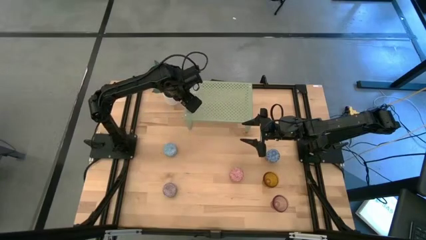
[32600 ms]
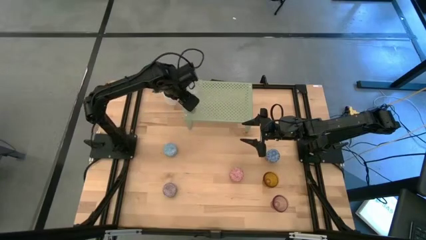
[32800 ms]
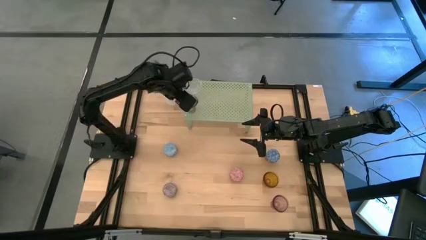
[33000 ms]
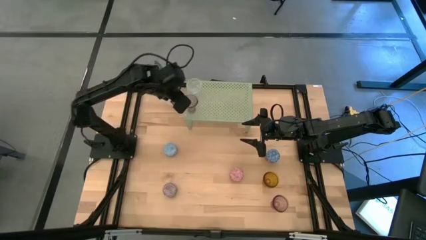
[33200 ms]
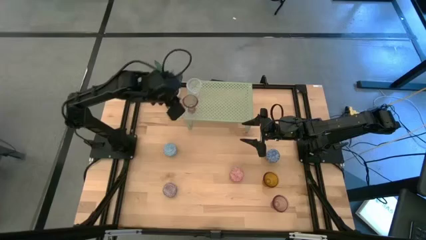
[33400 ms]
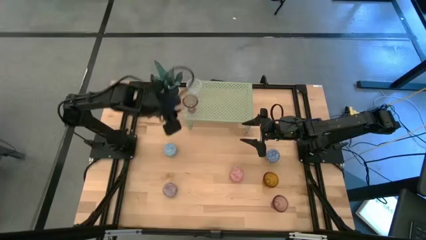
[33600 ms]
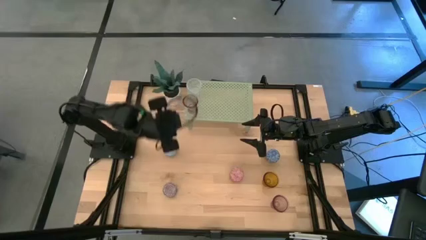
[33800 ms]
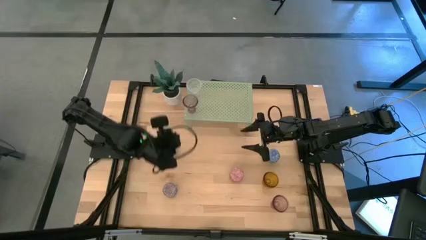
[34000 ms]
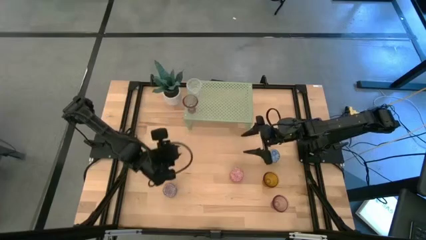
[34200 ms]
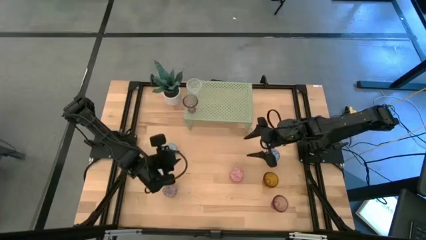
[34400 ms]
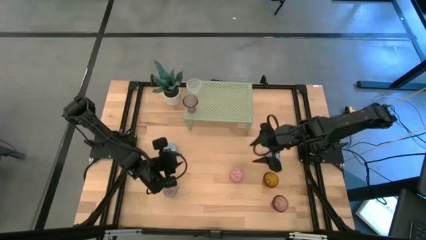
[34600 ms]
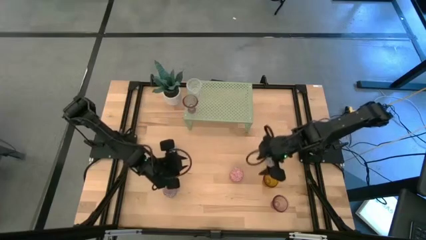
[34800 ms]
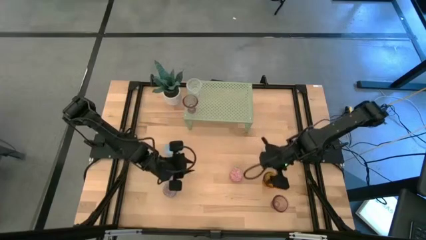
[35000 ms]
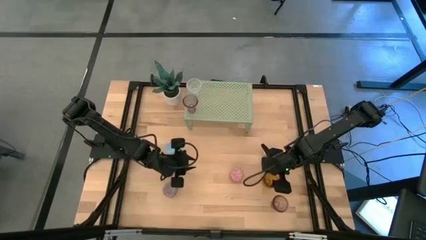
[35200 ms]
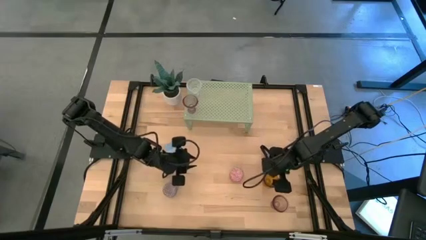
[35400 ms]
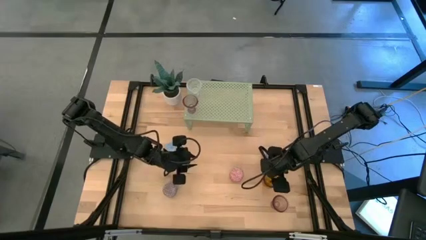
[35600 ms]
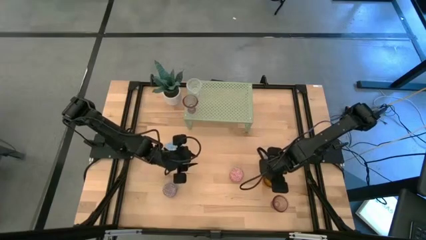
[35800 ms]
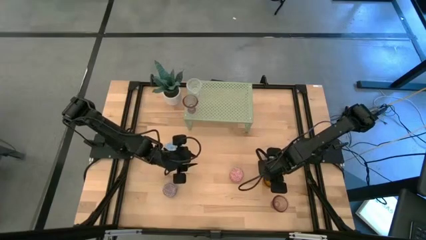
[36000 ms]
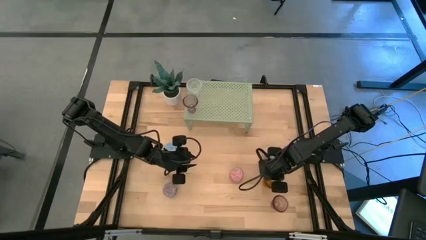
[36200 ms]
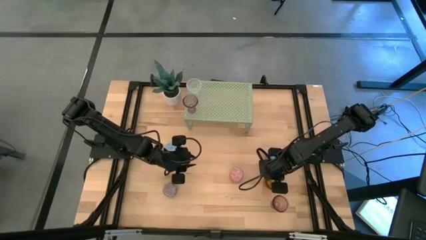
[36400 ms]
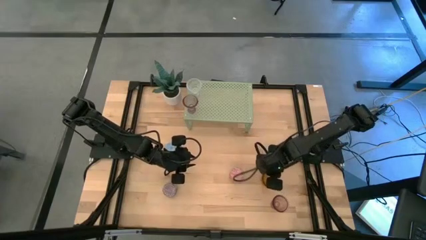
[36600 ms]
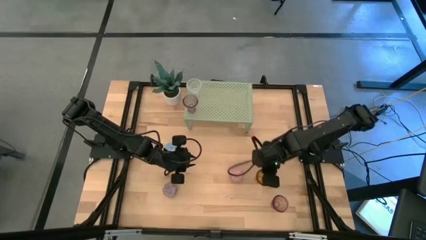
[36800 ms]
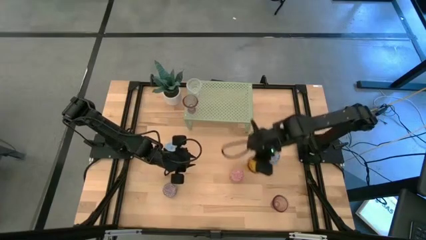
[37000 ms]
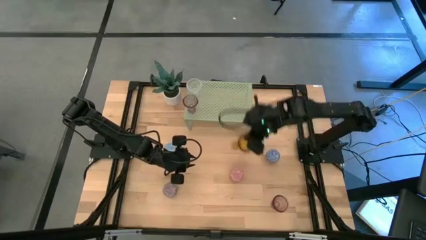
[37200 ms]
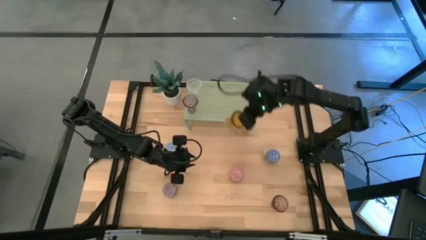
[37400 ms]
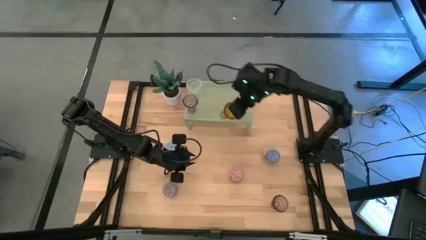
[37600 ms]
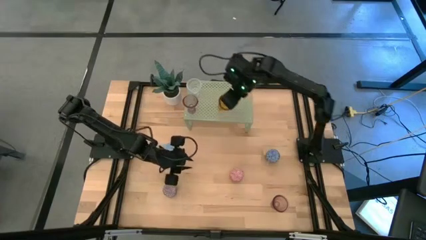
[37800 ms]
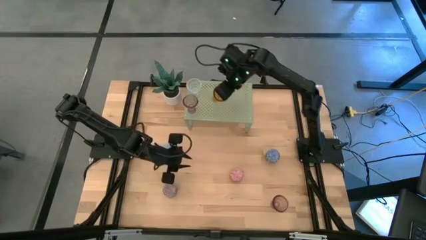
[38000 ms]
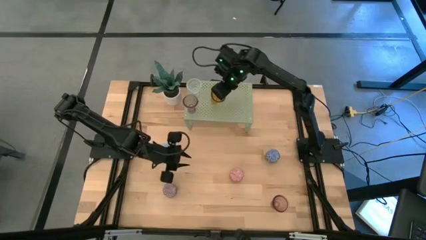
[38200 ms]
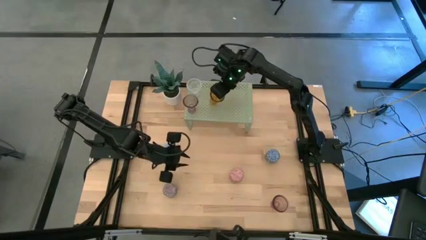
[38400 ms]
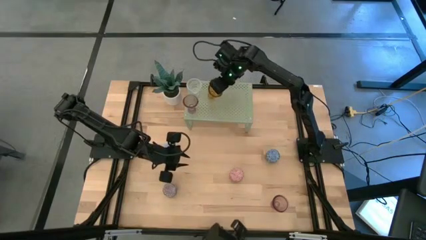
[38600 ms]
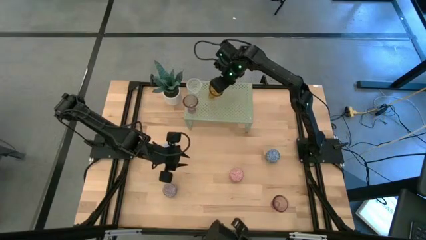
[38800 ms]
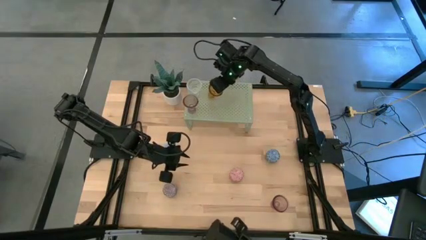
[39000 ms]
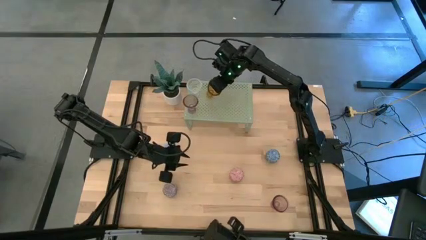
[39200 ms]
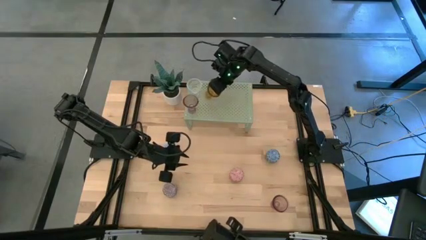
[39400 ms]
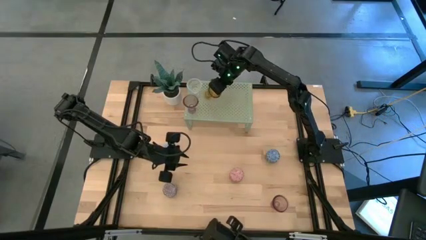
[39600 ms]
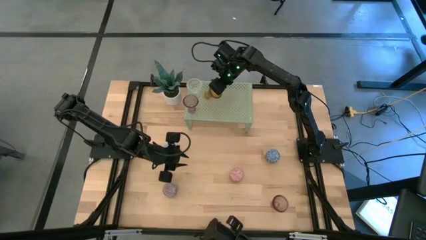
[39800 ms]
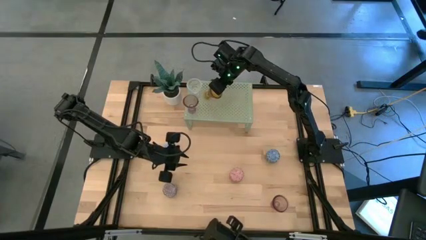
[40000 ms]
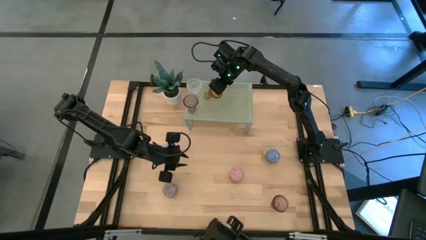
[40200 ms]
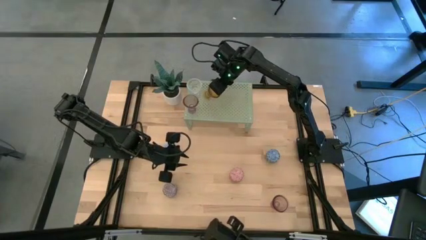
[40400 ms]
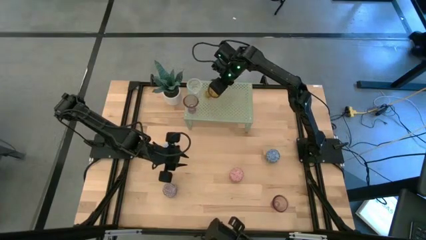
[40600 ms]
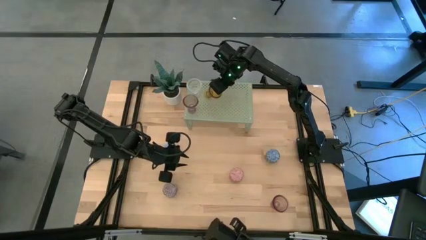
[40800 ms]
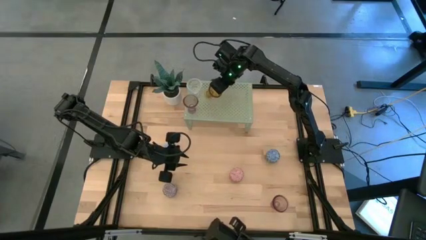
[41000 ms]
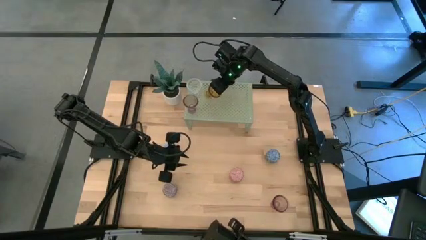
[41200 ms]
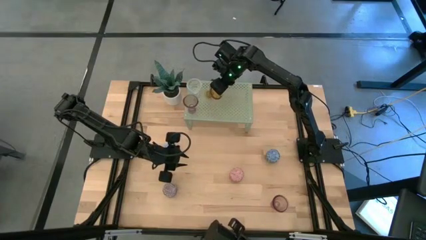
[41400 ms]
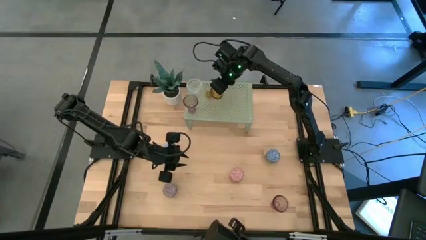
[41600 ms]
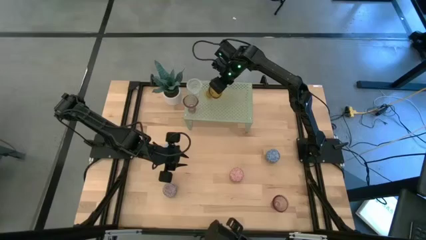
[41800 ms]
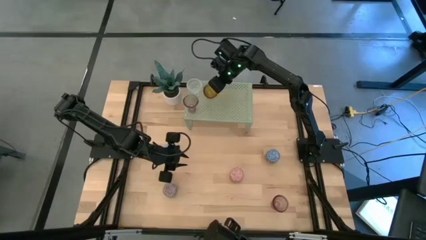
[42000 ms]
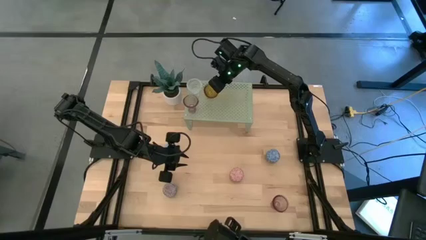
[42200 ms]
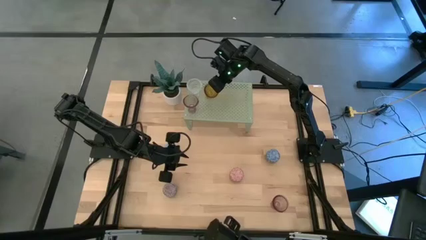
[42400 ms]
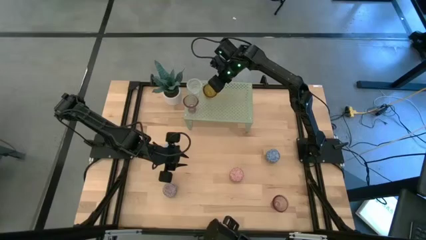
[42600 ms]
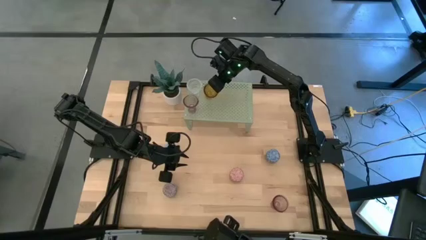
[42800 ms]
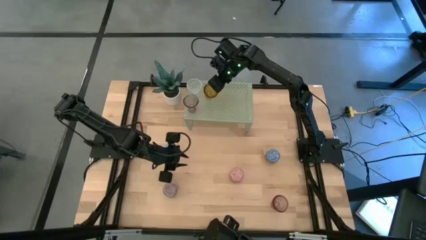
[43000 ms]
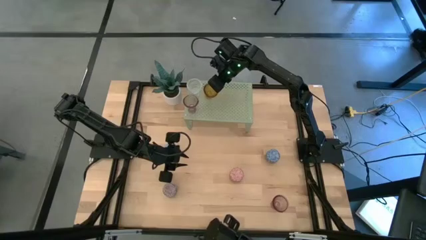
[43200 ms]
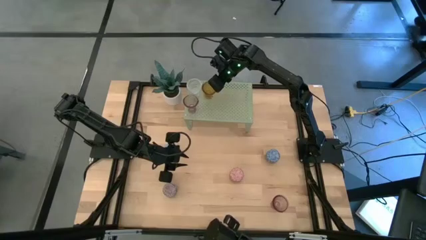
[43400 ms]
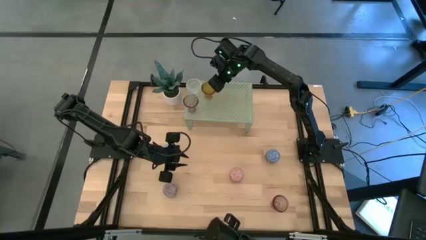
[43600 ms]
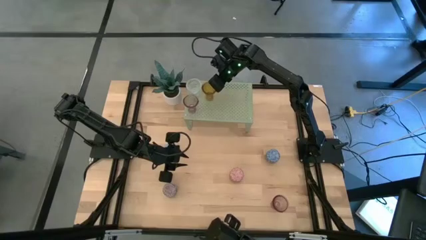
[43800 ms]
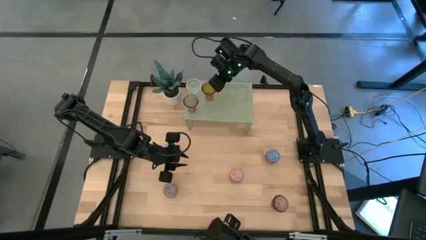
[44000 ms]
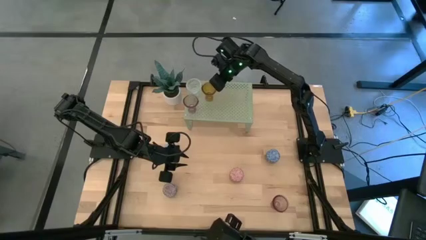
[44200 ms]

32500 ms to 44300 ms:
Task: Pick & Place candle stick holders
Put the orange glass candle holder on the shelf
